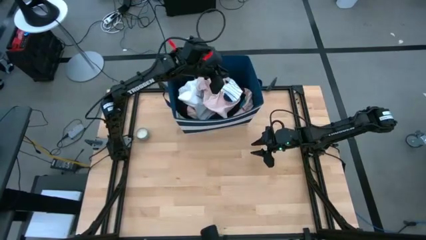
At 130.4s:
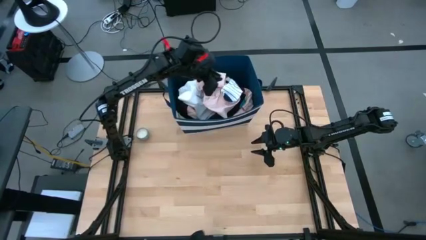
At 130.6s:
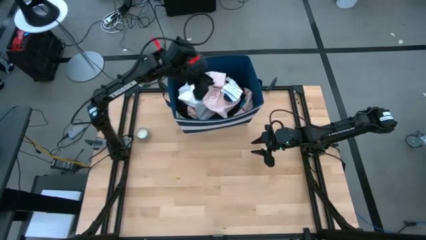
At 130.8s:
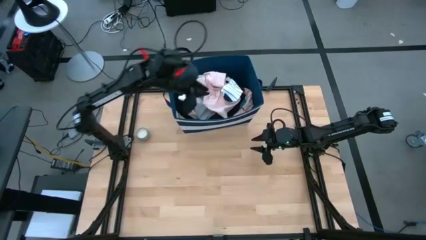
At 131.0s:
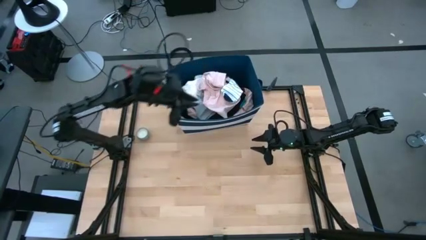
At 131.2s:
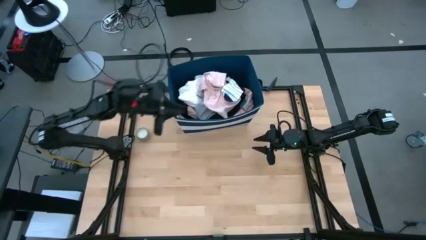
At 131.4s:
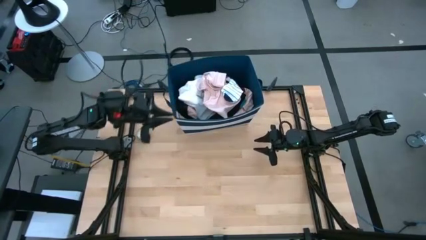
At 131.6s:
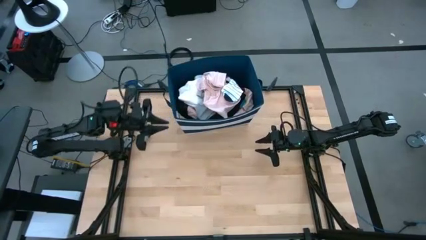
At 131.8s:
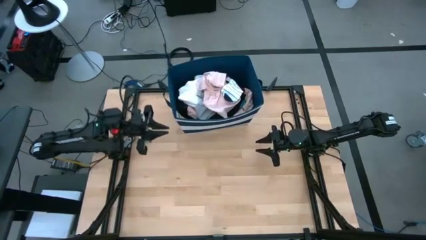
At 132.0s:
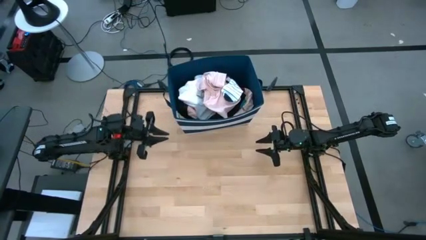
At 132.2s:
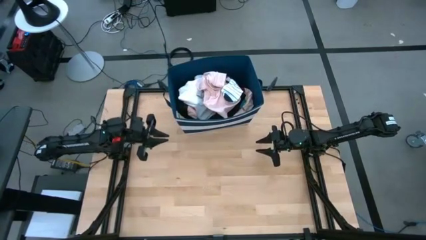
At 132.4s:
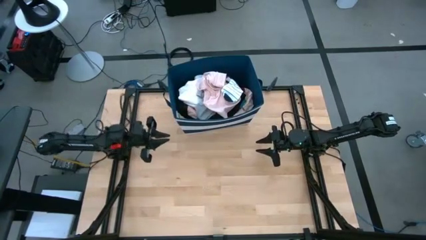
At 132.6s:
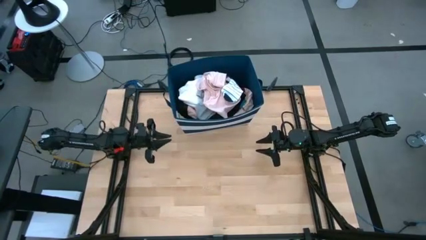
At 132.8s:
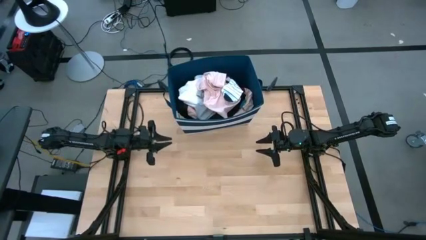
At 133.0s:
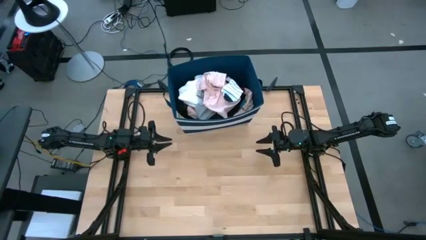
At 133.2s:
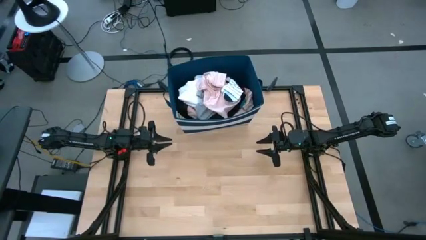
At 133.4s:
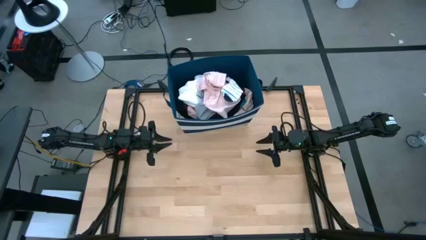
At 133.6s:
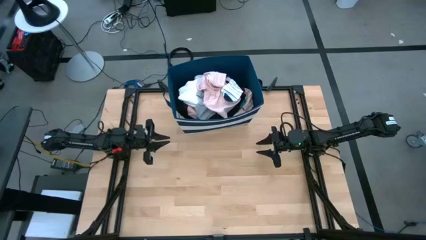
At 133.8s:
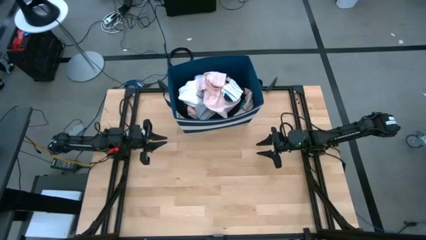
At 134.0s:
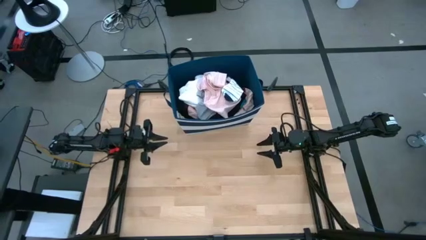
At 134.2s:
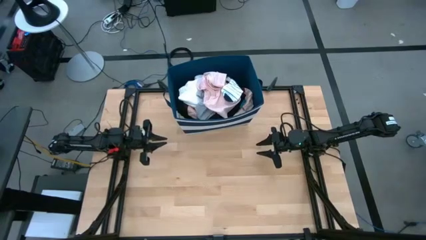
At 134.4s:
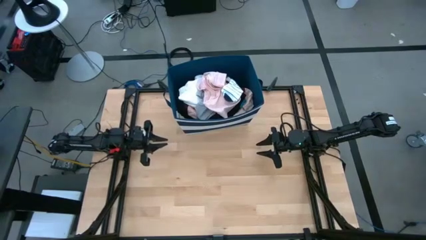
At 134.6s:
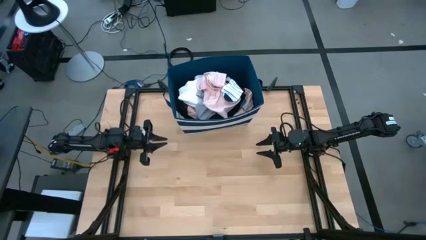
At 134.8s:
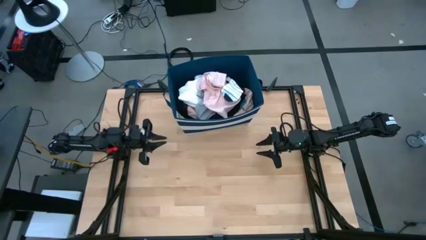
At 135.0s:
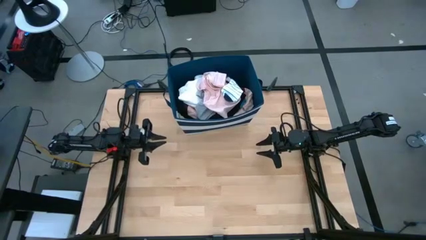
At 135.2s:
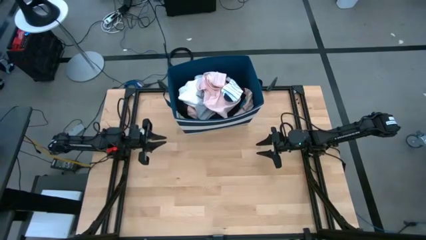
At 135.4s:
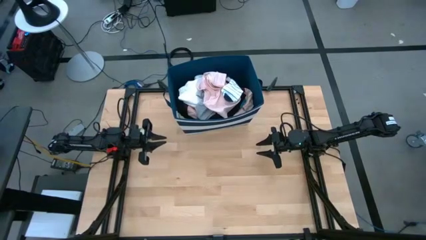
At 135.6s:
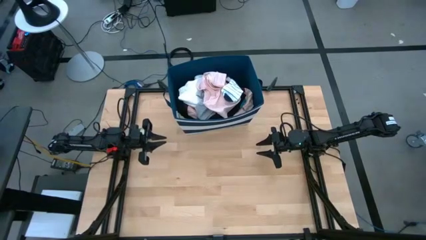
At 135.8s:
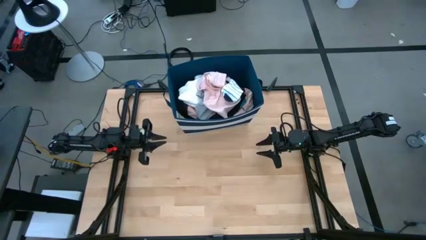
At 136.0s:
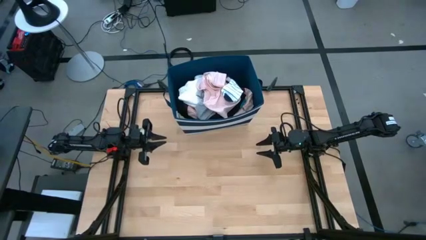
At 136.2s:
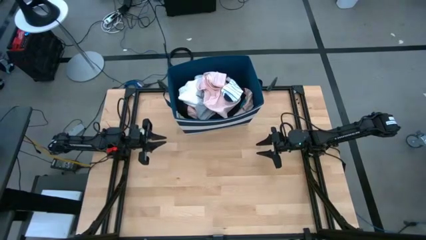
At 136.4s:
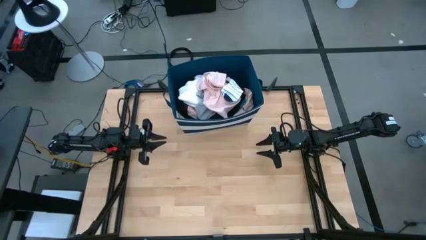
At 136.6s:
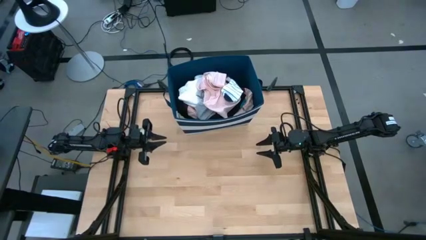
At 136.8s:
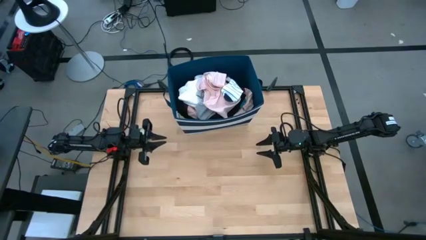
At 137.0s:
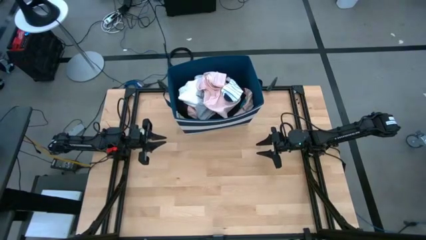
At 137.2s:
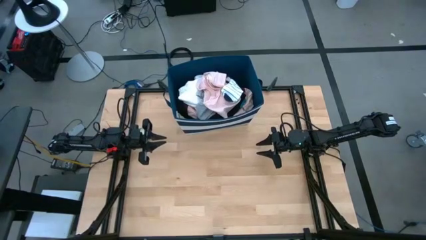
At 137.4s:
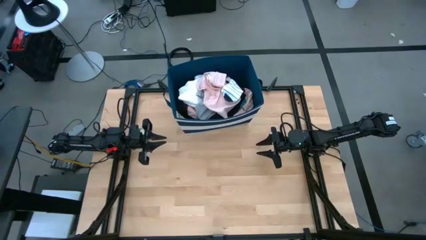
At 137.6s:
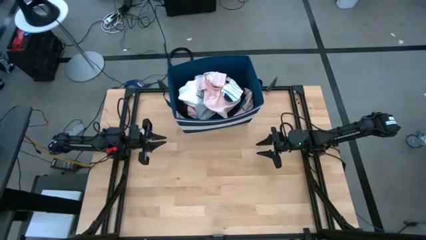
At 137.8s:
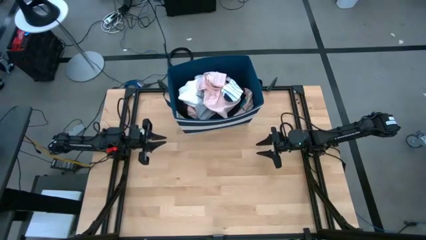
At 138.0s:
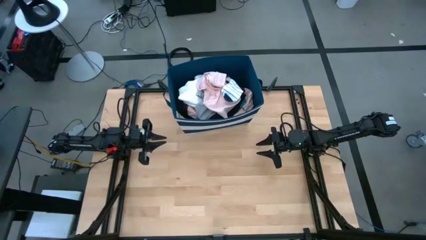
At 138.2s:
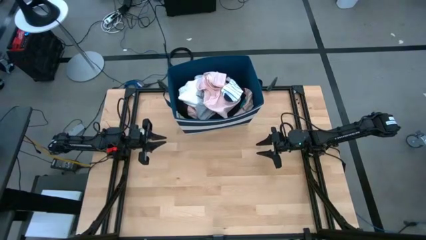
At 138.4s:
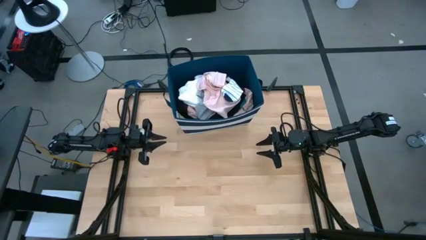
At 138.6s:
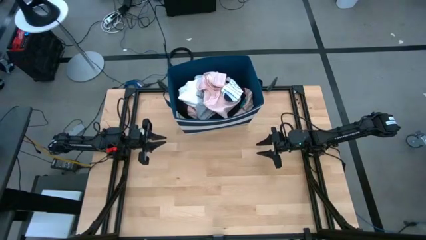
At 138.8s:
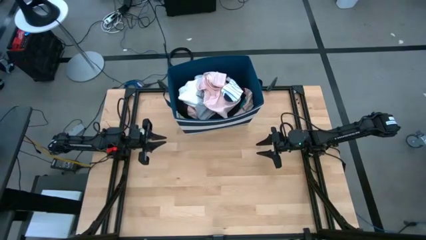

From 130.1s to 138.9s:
Task: Sort clothes
Return to Home Position

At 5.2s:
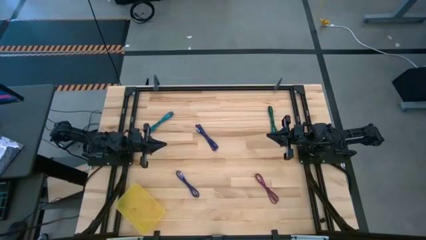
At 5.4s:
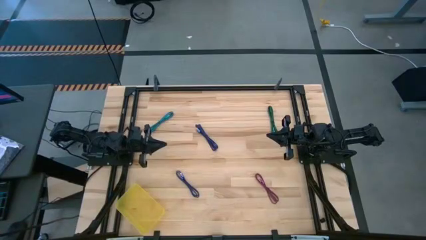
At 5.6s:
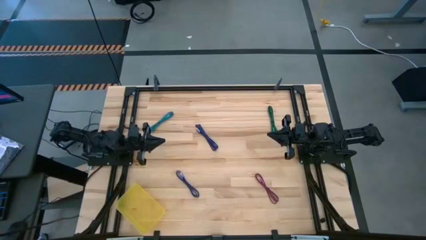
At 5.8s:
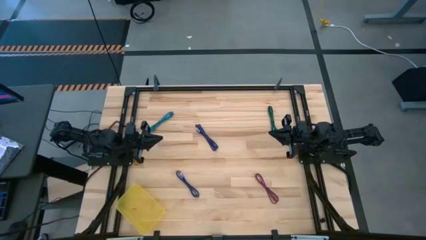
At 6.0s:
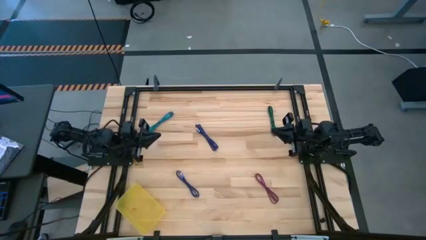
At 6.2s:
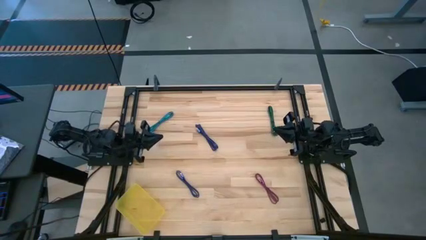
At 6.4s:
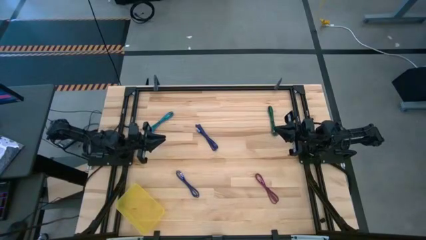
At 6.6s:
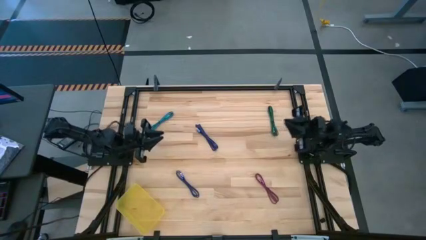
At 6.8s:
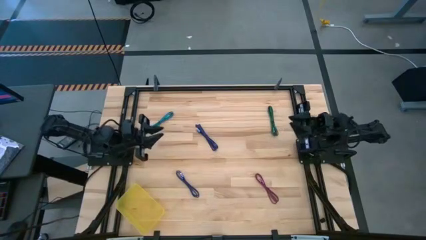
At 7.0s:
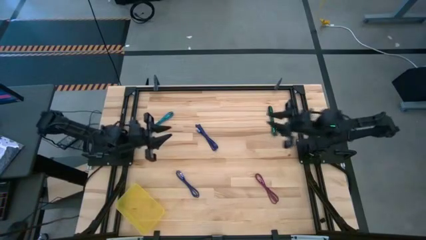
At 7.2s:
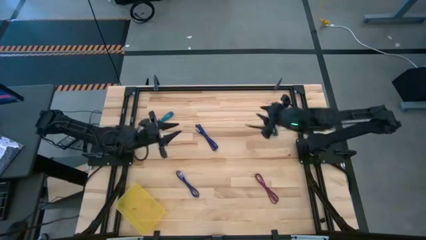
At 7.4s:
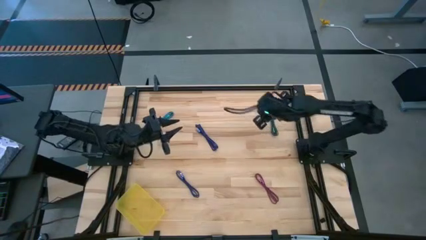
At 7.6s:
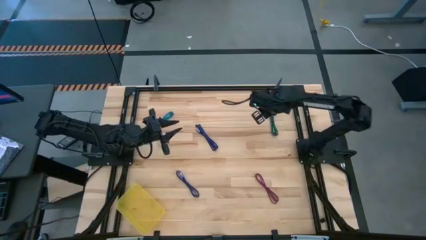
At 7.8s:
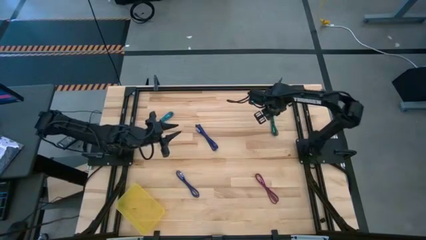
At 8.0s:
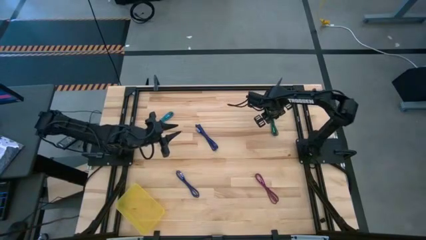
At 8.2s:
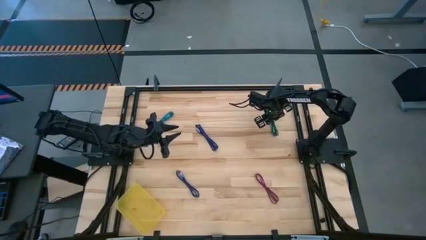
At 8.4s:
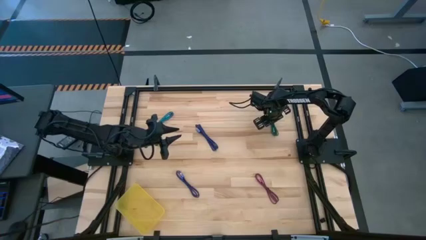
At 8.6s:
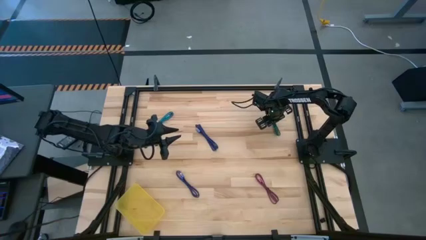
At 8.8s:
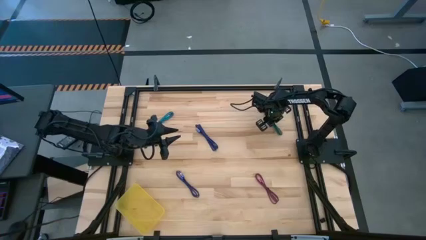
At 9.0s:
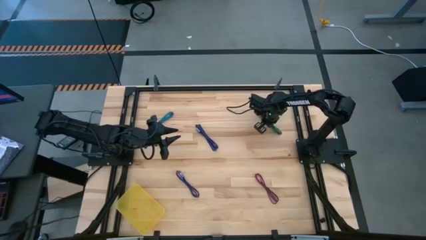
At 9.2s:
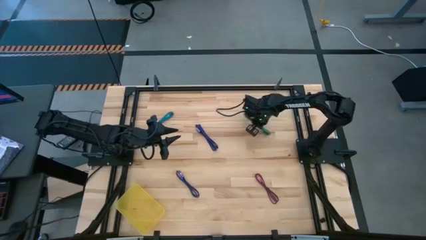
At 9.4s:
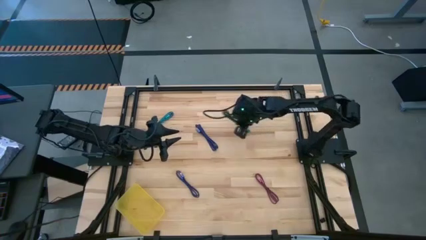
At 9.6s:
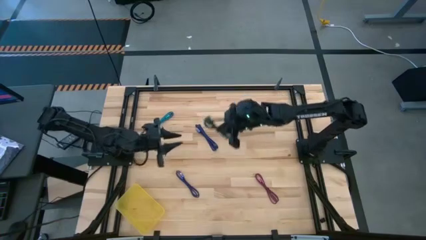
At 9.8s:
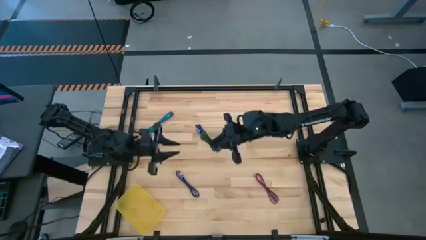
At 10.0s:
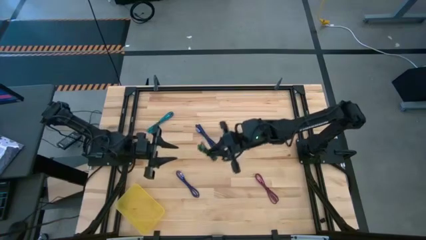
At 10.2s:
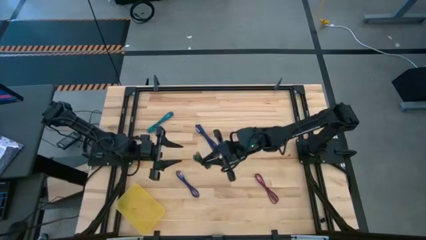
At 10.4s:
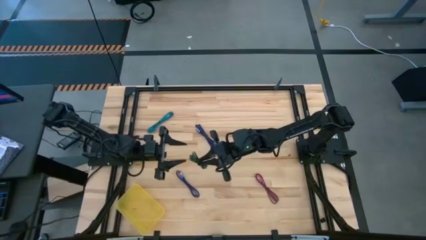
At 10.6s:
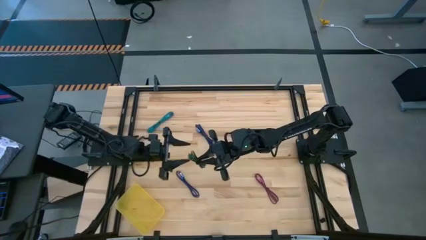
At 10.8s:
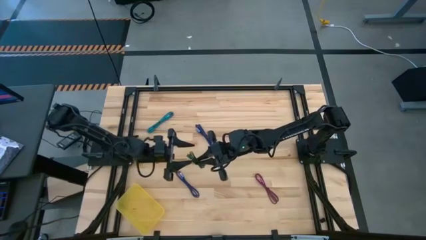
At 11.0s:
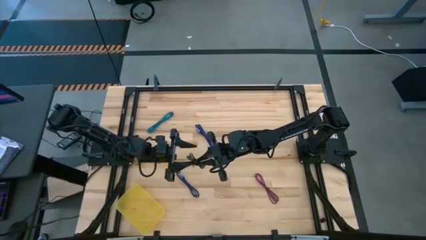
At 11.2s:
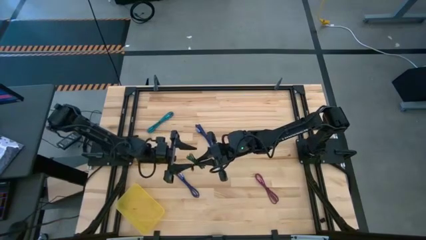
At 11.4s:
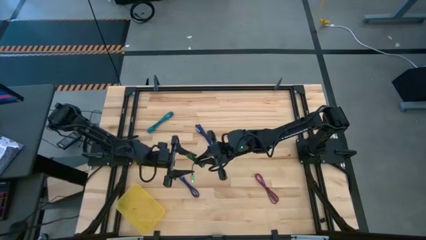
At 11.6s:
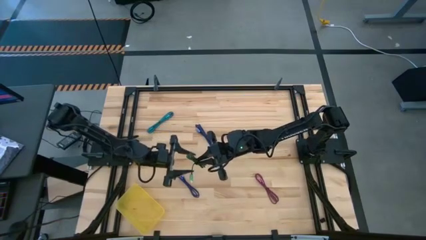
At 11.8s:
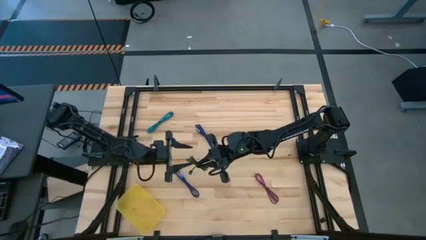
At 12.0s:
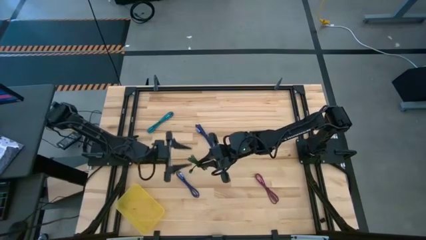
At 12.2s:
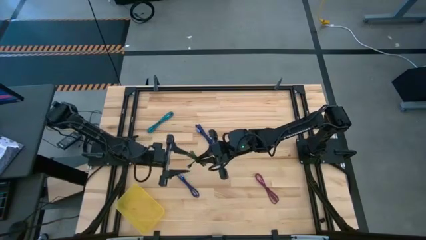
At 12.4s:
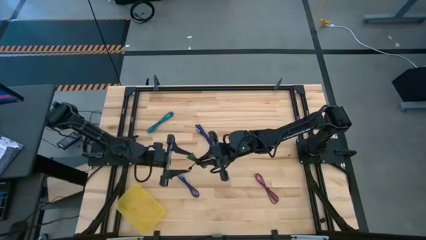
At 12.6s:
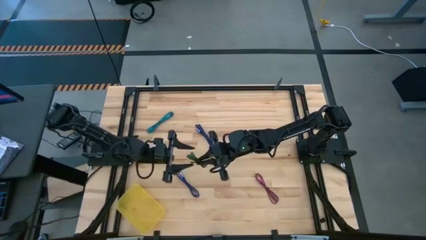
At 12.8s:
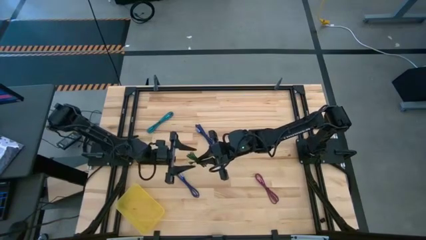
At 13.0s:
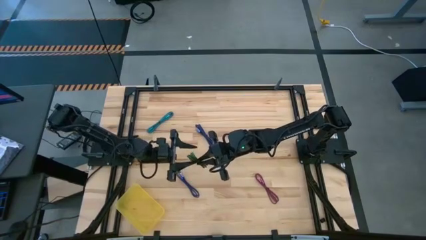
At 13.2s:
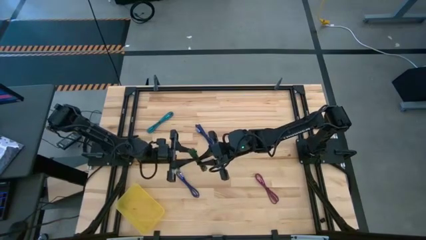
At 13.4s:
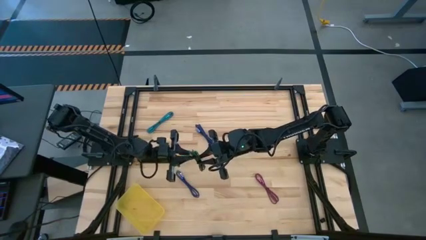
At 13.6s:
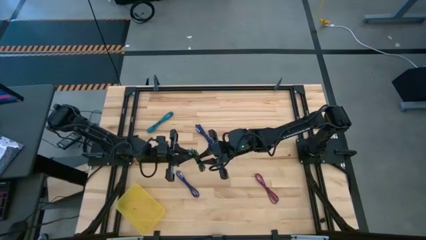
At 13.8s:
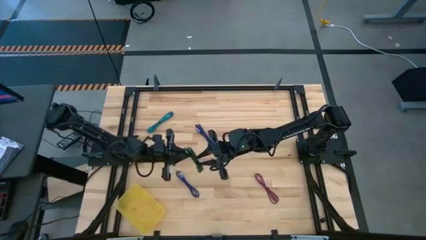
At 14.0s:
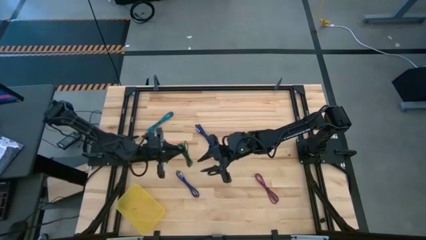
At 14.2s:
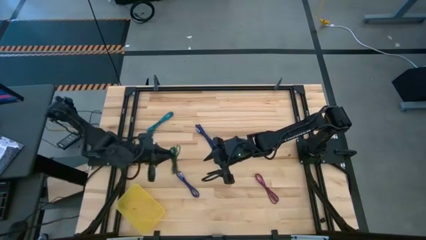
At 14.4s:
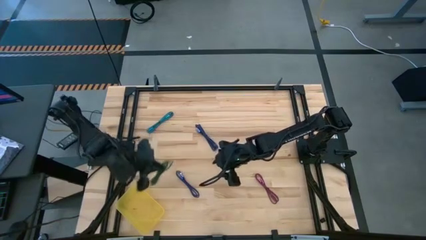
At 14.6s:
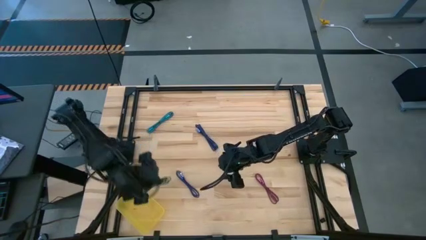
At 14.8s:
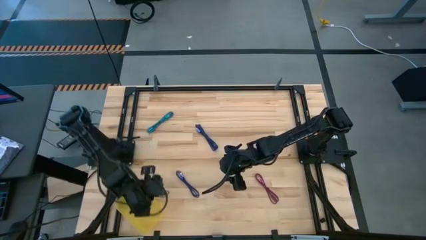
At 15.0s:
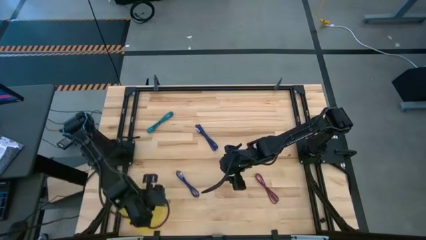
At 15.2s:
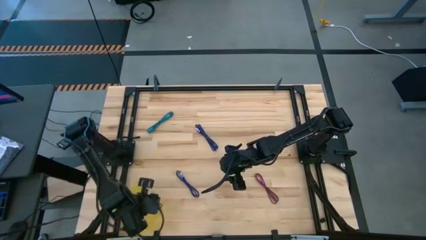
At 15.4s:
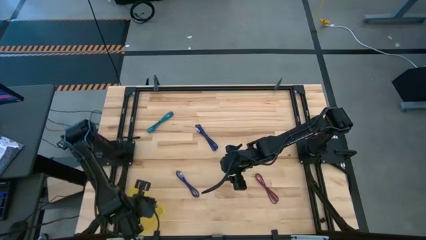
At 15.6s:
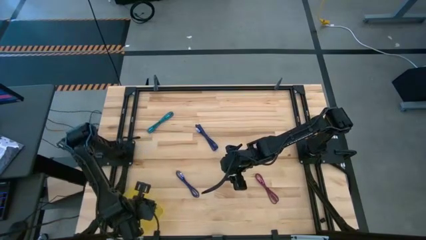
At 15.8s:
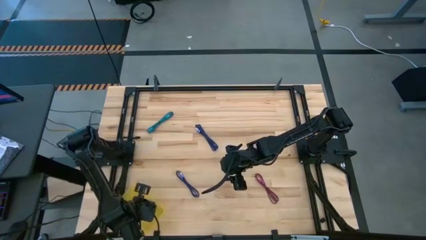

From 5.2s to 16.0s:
Task: Pick and place USB-C Cables
Put the black charger cable into the yellow bin
